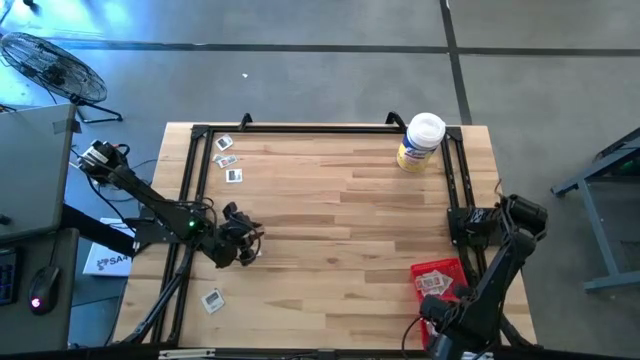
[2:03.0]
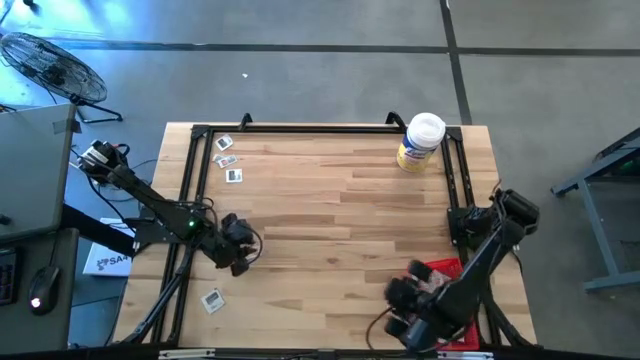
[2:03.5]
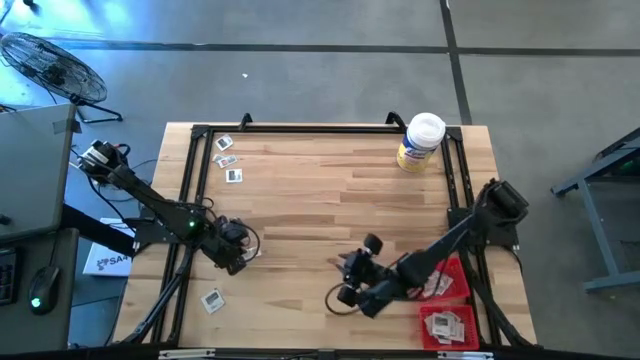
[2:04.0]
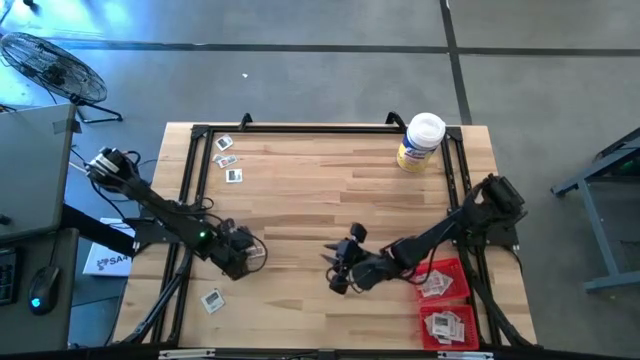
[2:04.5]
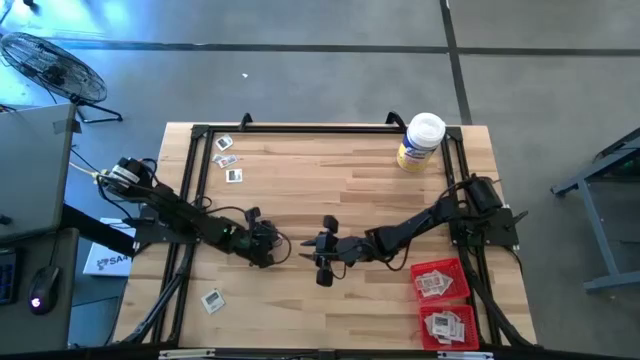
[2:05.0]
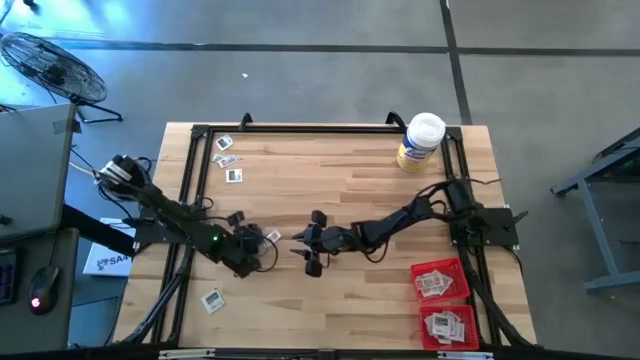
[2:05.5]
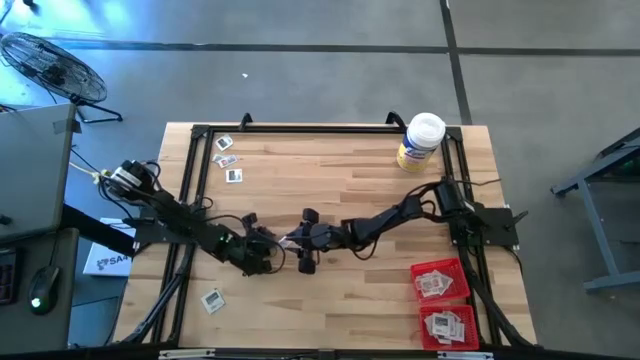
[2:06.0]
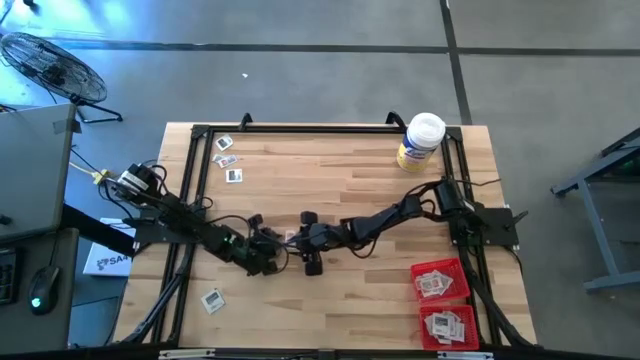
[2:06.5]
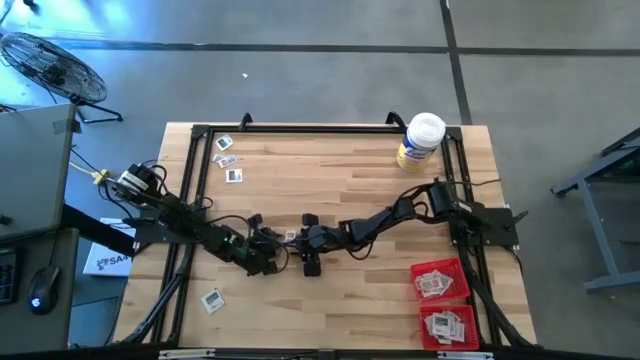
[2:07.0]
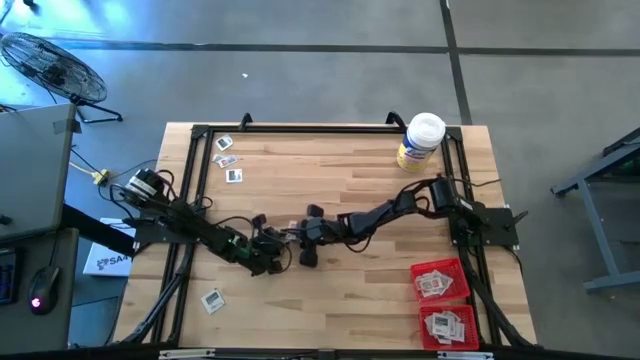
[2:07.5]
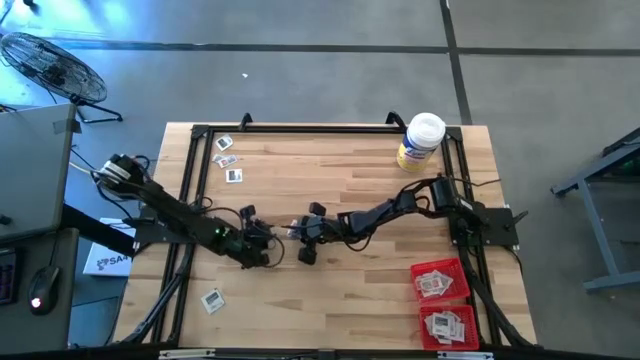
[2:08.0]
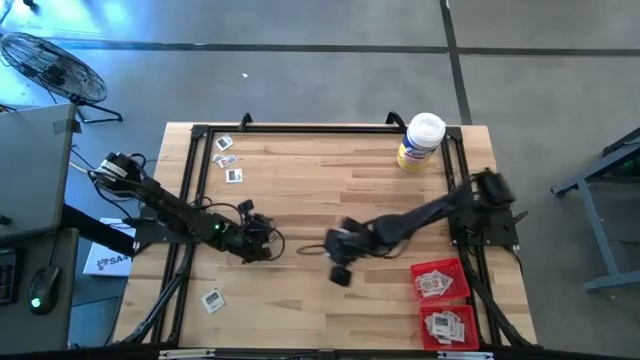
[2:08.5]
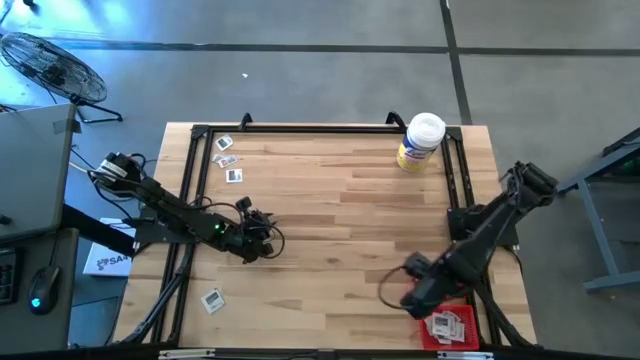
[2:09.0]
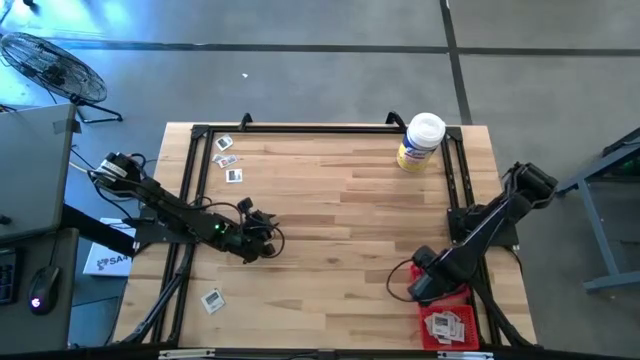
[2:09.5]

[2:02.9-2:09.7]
Task: Pick & Place First Aid Supplies
Put the white ointment pack into the top red bin

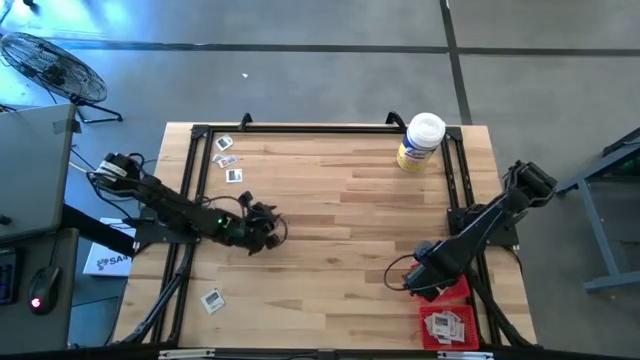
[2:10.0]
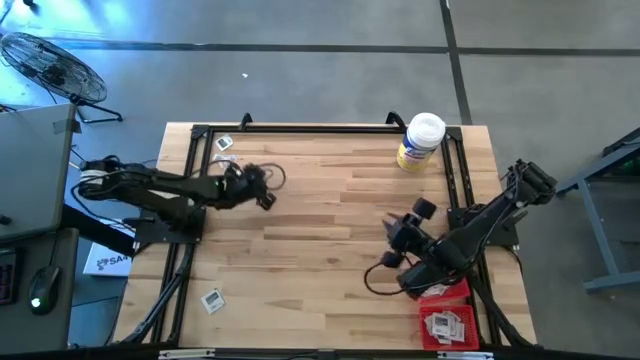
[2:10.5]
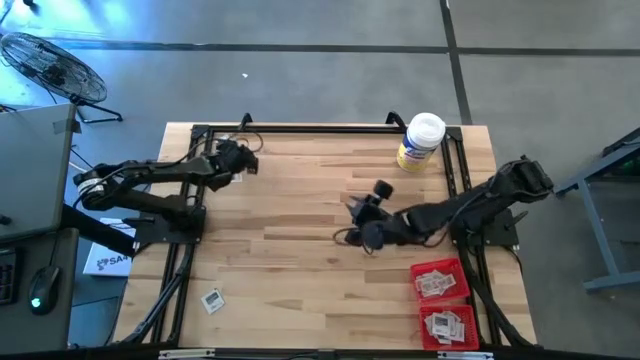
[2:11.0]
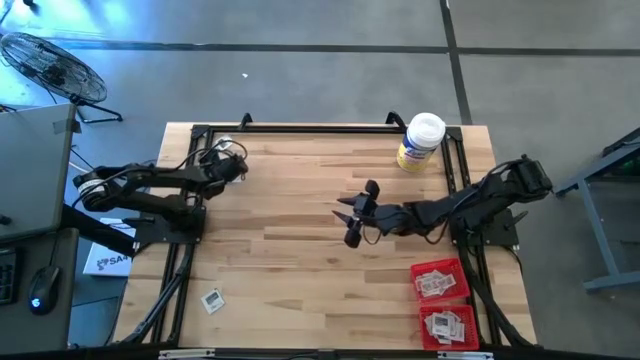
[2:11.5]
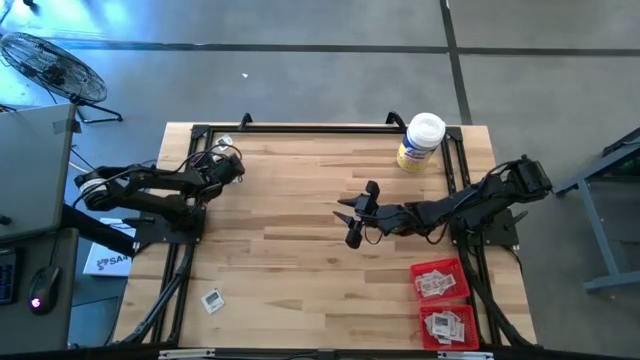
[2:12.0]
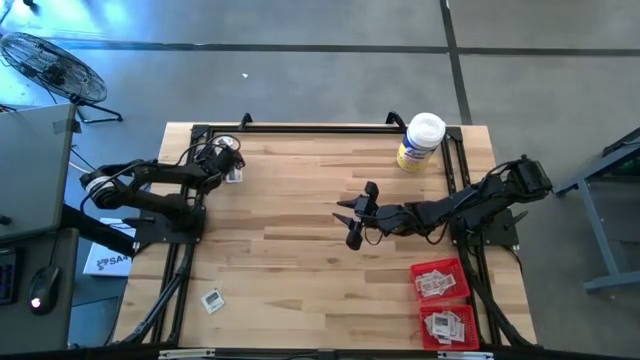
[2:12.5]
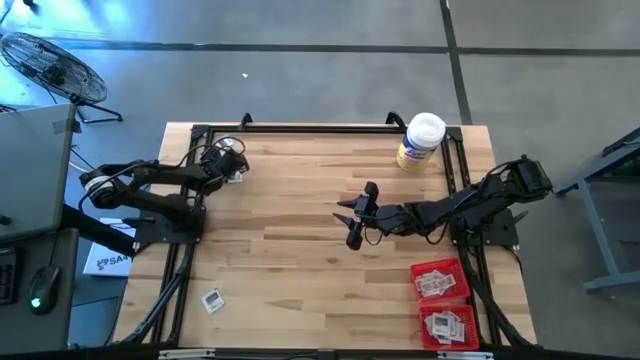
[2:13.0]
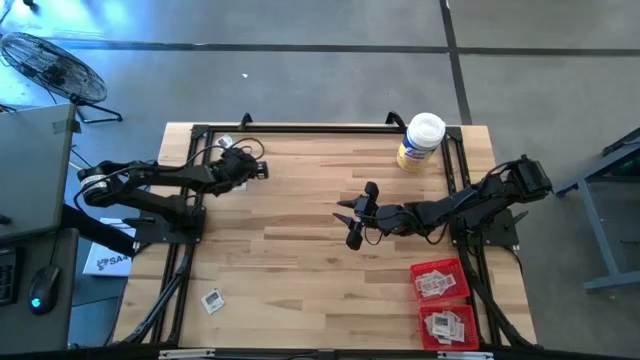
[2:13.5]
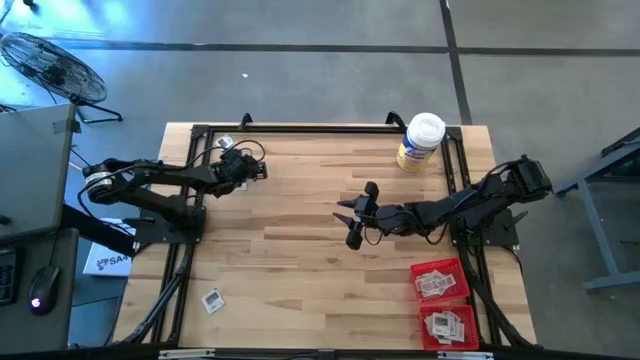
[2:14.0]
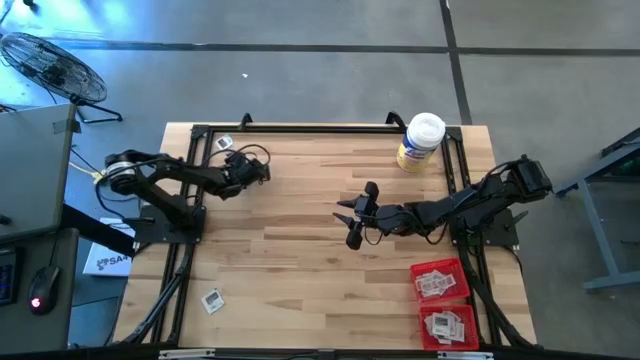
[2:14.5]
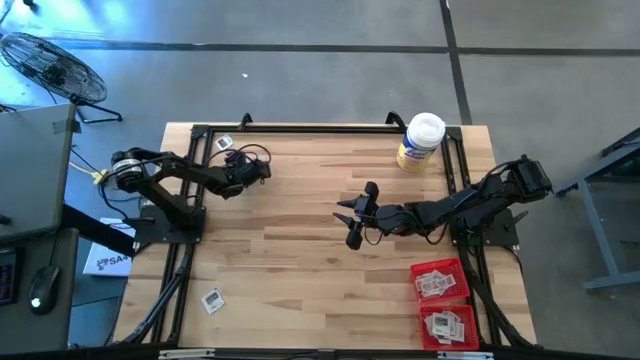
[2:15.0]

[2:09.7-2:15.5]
Put the white ointment pack into the top red bin

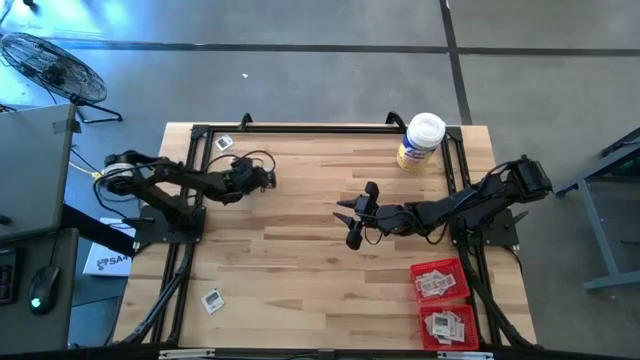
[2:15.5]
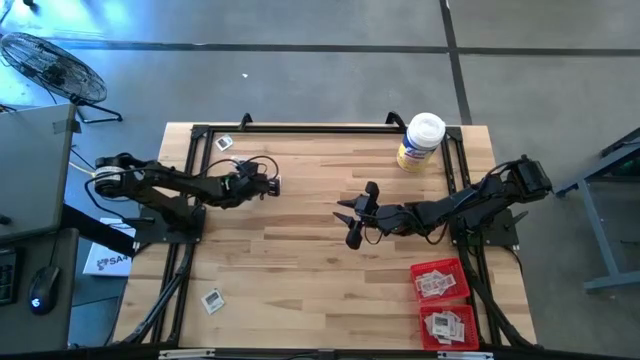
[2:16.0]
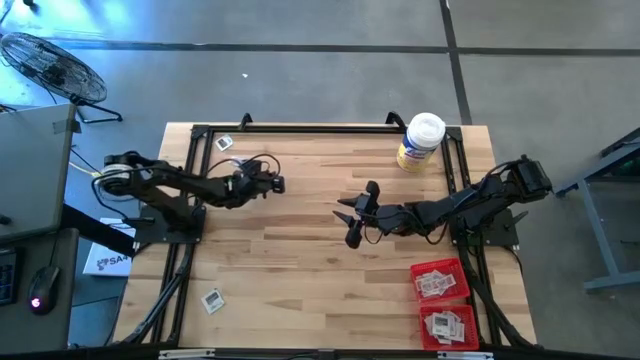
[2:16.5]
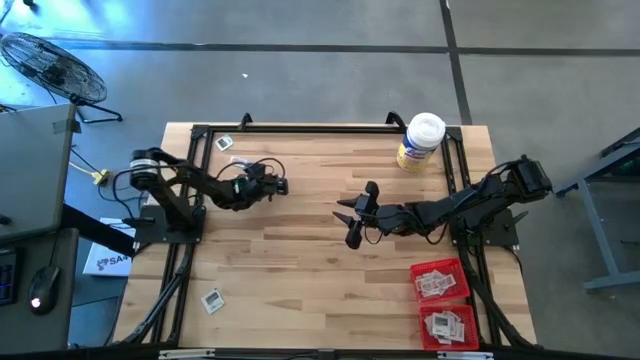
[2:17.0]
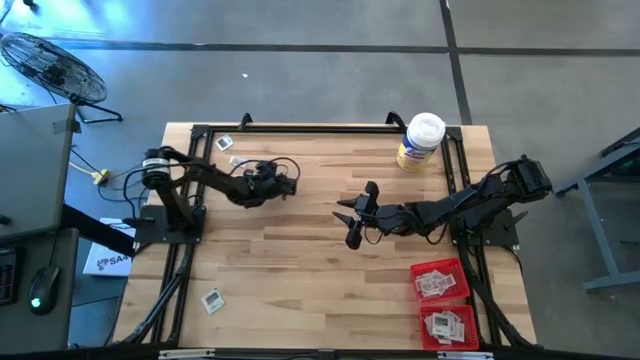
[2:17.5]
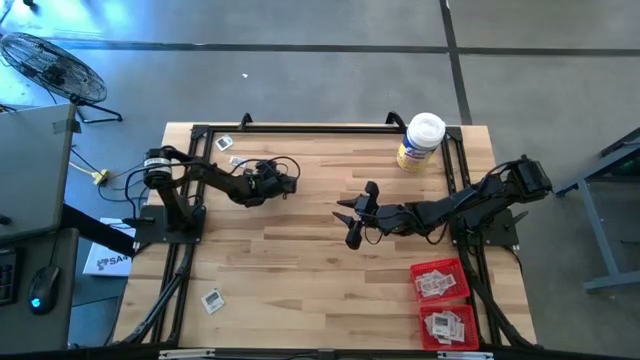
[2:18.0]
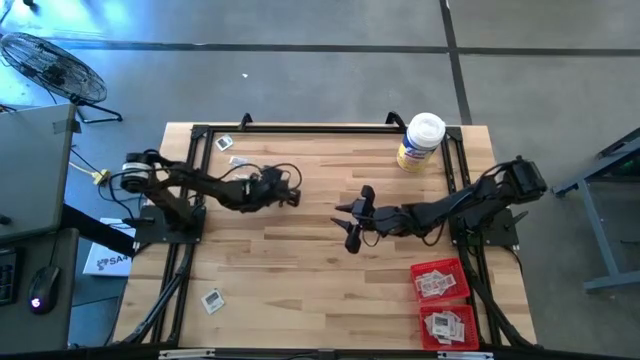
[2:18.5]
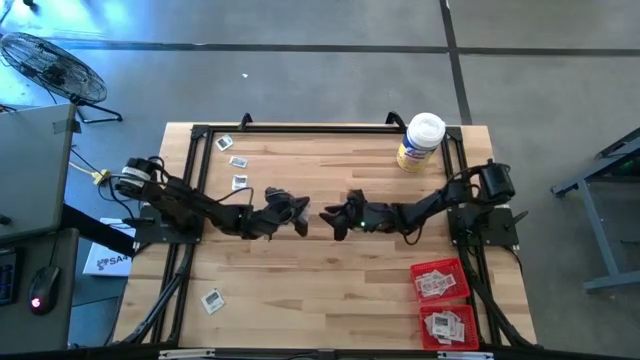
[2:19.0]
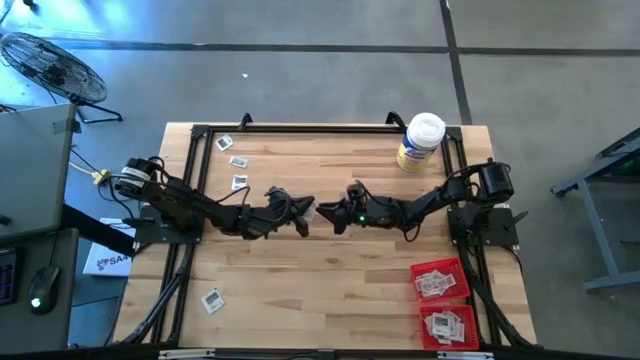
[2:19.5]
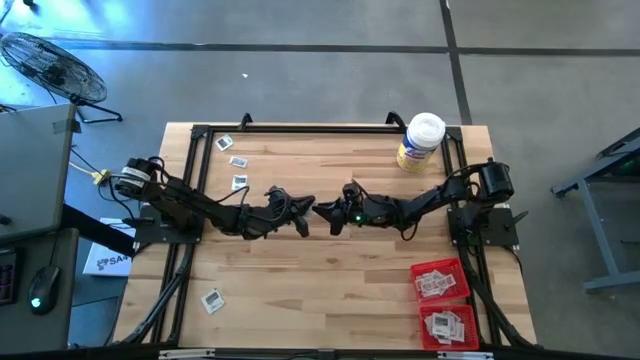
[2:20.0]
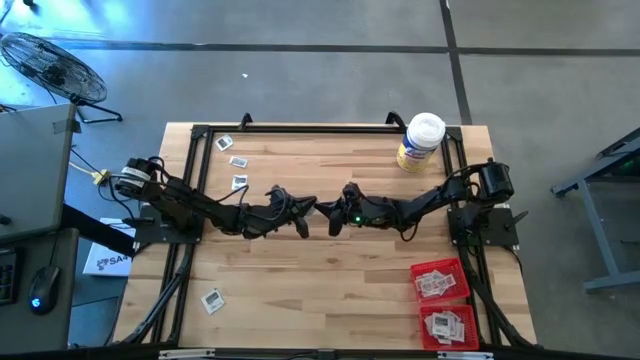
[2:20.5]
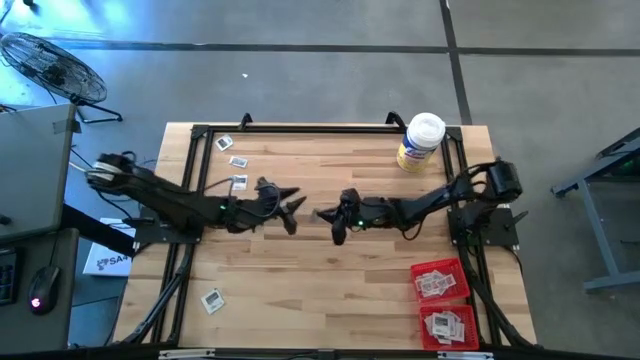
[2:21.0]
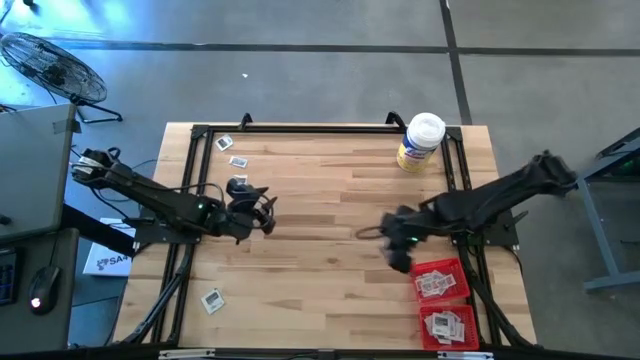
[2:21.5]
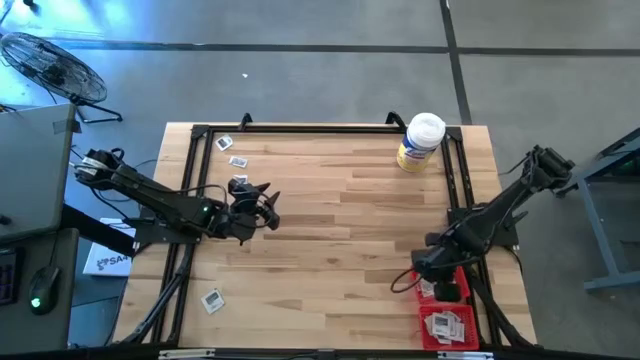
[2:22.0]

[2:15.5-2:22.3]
Put the white ointment pack into the top red bin

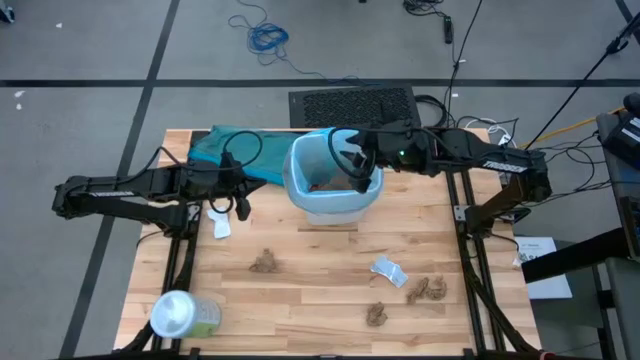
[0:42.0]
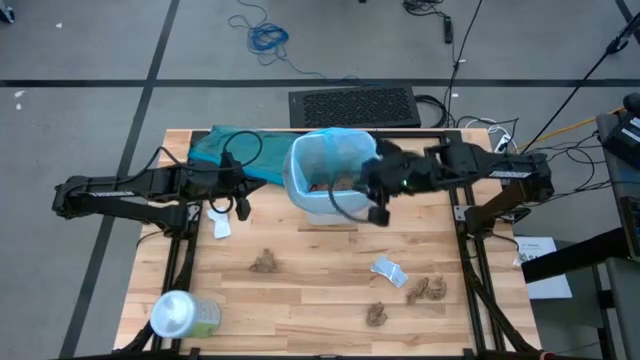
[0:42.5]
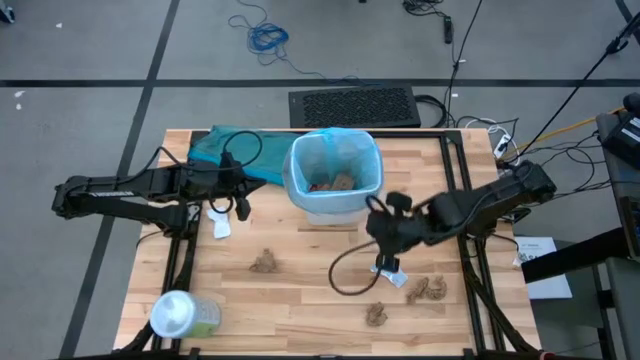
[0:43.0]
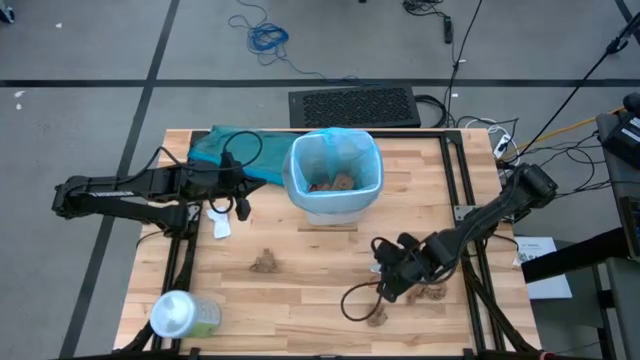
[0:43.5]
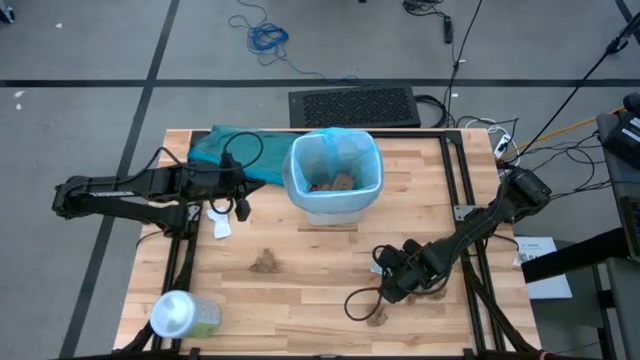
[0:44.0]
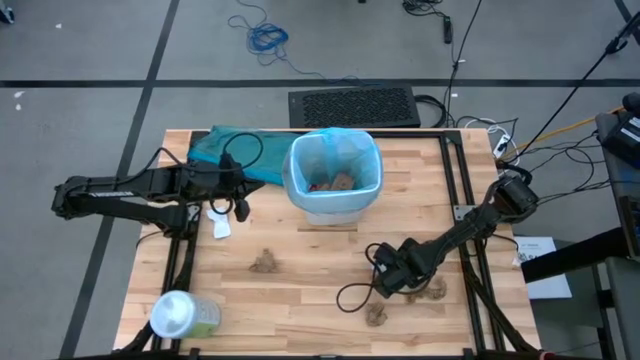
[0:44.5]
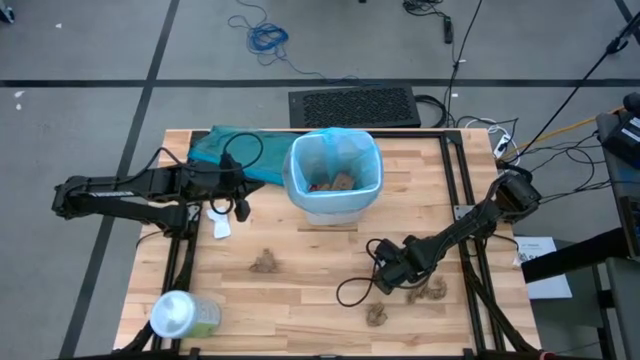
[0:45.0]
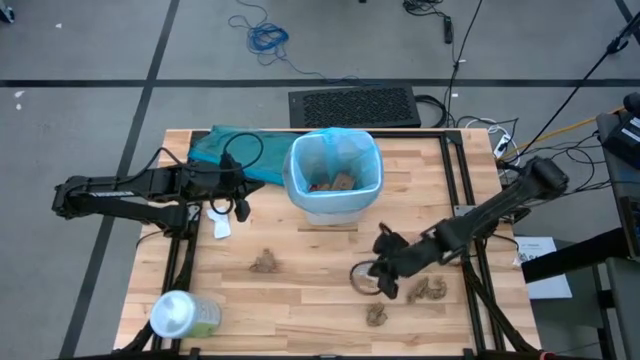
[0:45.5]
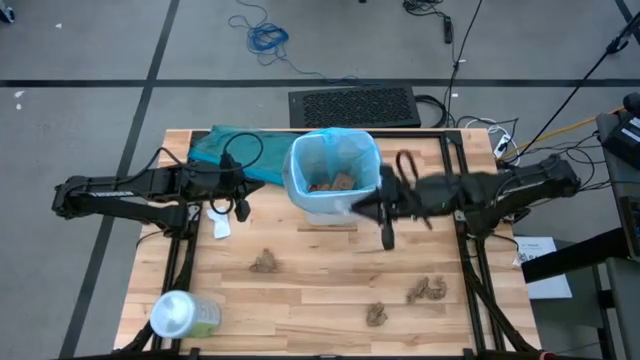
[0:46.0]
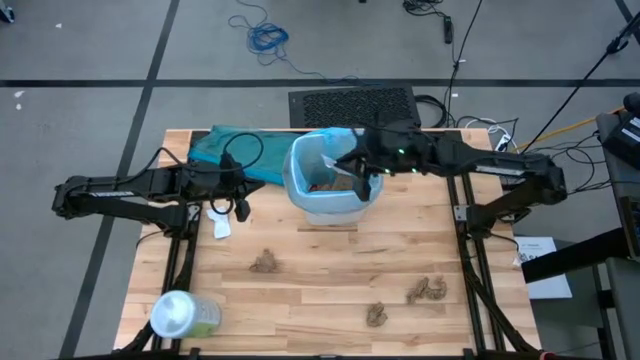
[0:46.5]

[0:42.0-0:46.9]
Task: place trash/remove bag and relplace
Put the white paper into the trash bin
